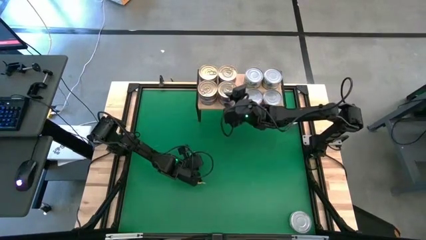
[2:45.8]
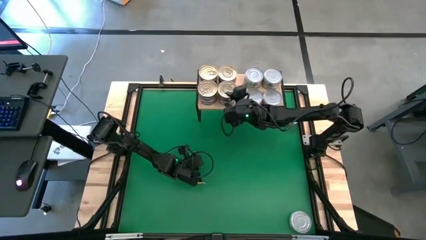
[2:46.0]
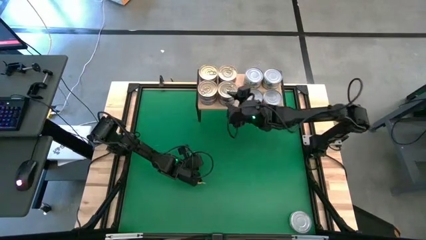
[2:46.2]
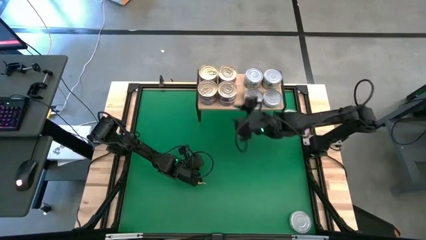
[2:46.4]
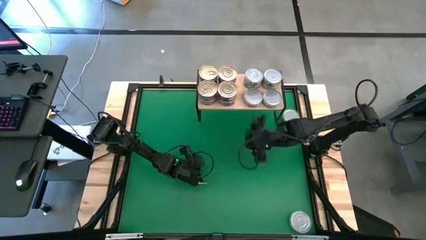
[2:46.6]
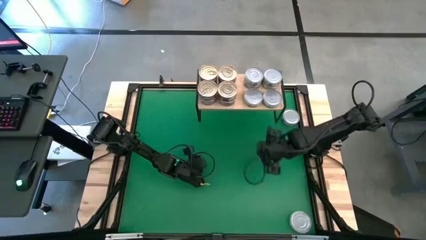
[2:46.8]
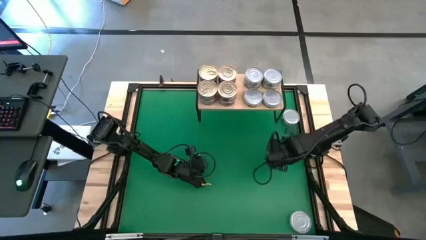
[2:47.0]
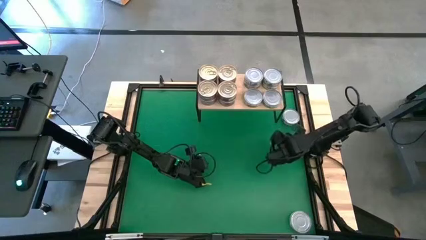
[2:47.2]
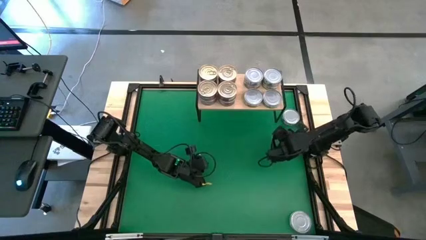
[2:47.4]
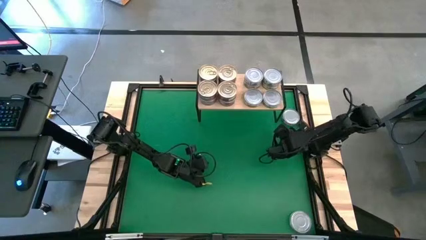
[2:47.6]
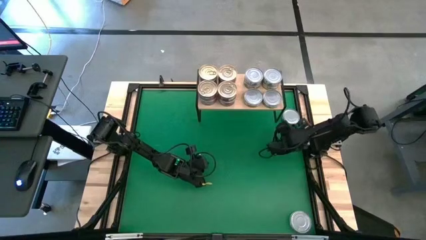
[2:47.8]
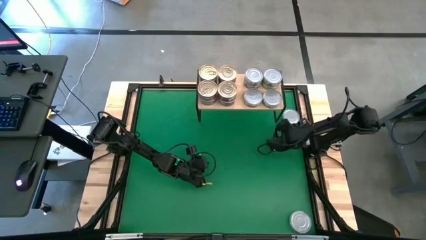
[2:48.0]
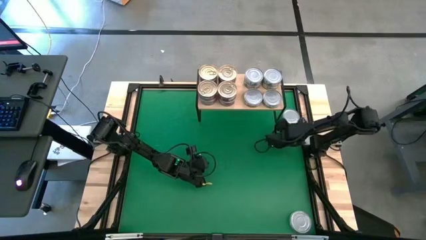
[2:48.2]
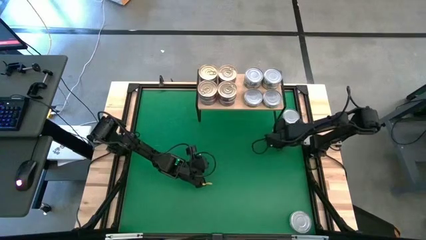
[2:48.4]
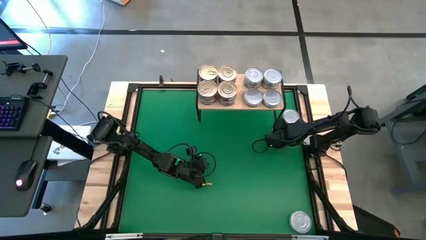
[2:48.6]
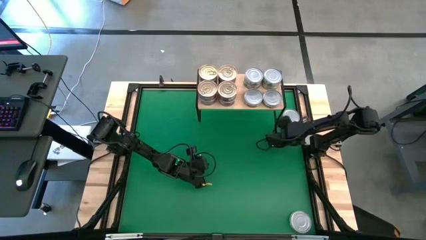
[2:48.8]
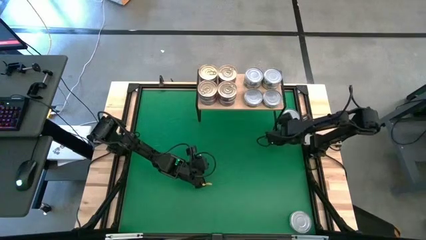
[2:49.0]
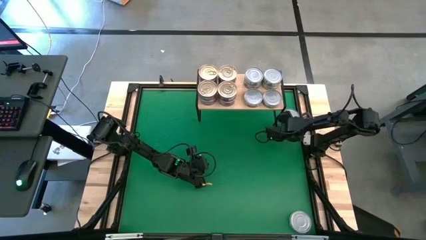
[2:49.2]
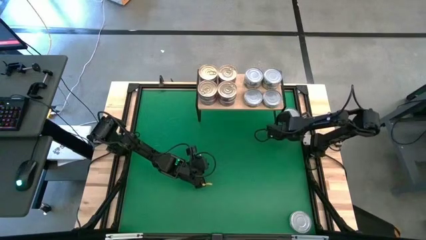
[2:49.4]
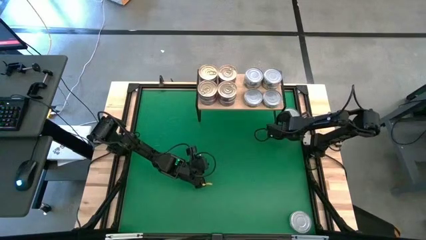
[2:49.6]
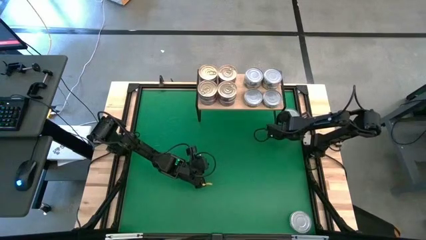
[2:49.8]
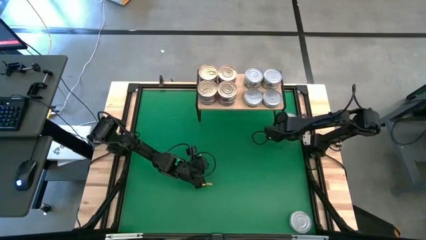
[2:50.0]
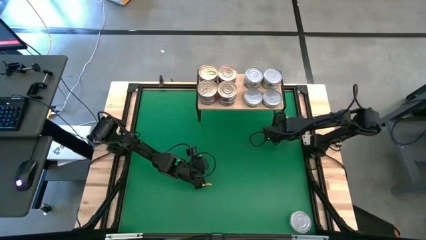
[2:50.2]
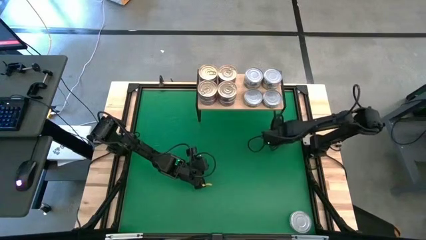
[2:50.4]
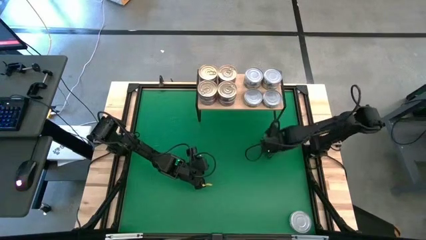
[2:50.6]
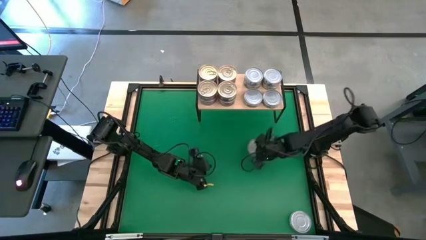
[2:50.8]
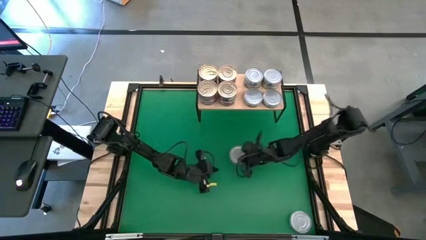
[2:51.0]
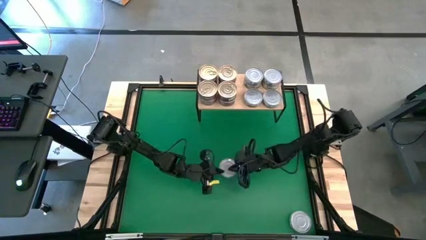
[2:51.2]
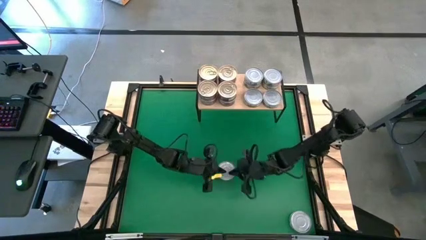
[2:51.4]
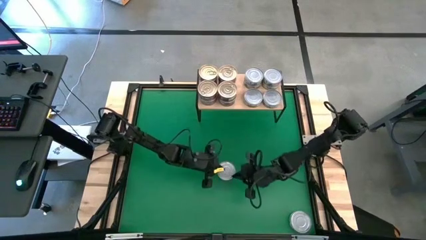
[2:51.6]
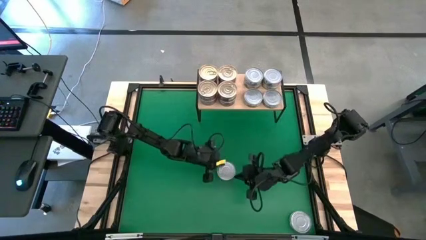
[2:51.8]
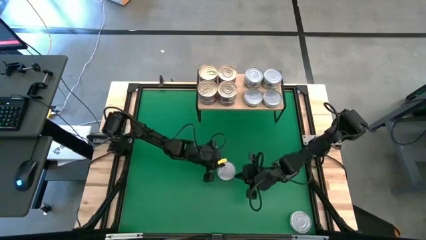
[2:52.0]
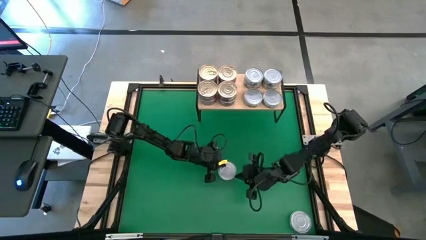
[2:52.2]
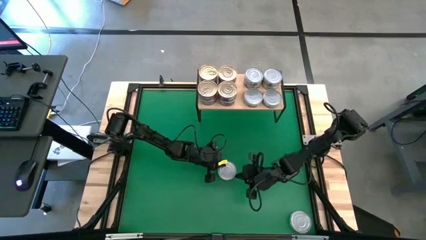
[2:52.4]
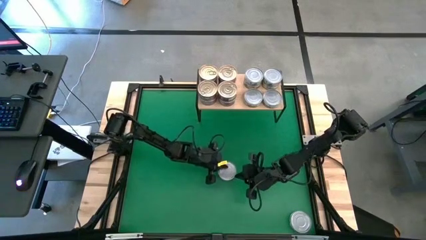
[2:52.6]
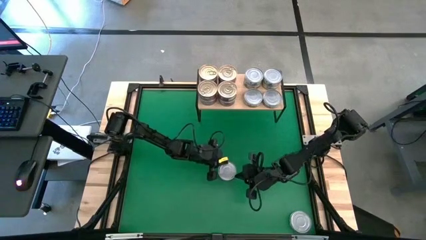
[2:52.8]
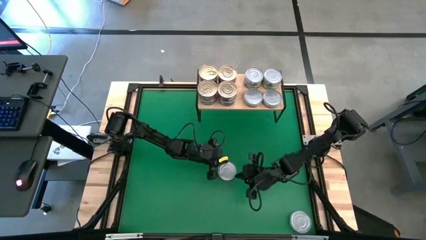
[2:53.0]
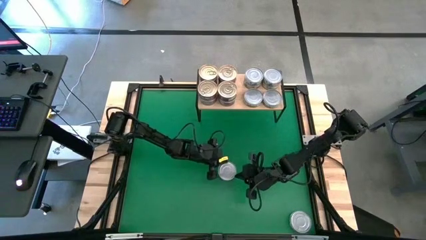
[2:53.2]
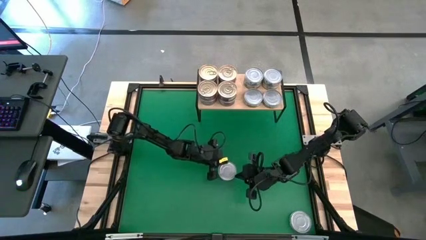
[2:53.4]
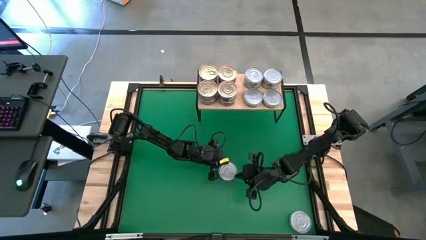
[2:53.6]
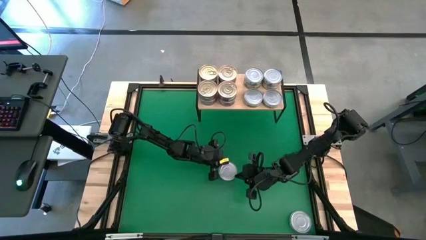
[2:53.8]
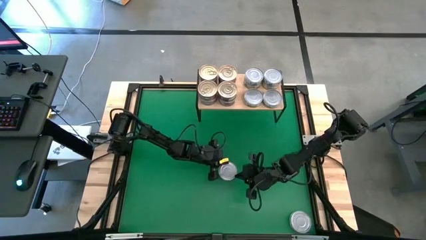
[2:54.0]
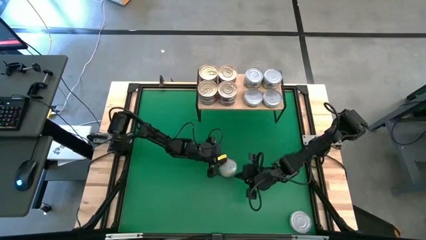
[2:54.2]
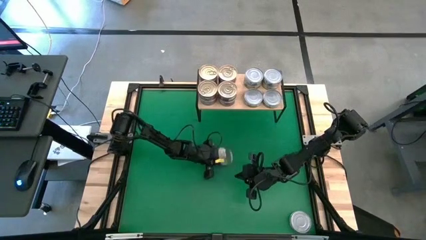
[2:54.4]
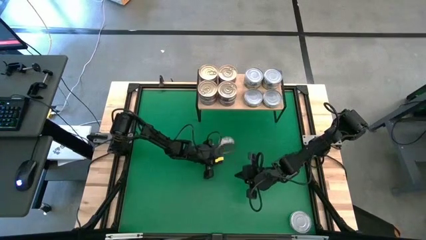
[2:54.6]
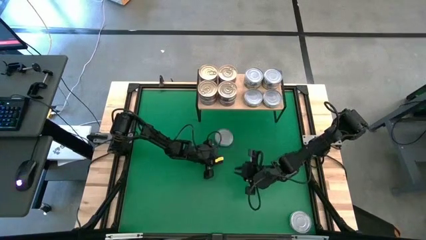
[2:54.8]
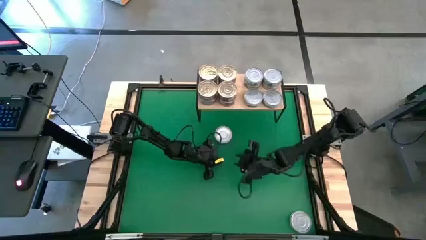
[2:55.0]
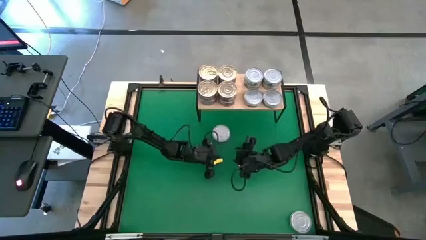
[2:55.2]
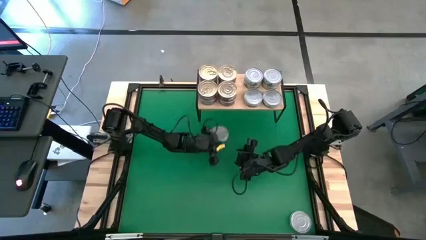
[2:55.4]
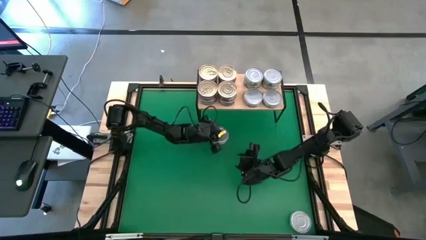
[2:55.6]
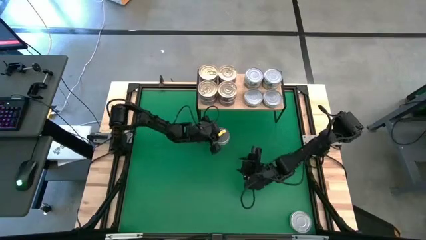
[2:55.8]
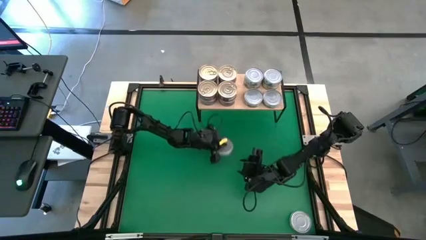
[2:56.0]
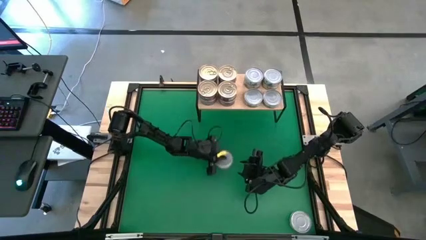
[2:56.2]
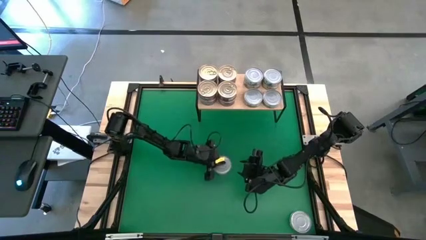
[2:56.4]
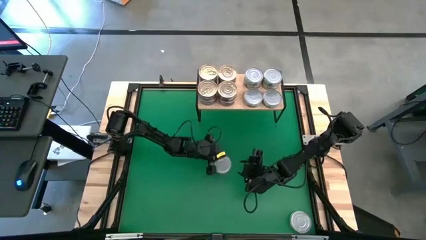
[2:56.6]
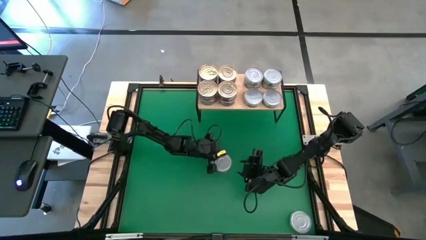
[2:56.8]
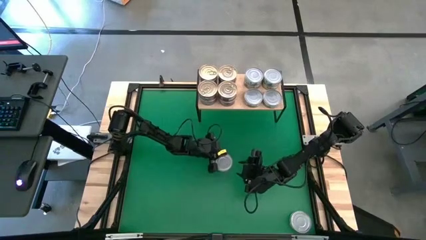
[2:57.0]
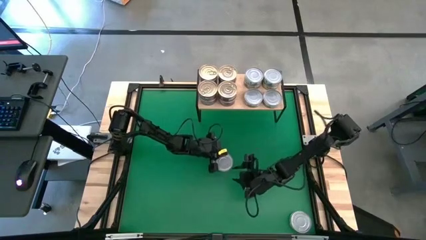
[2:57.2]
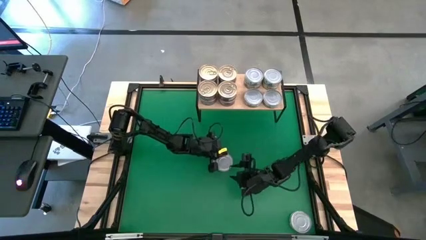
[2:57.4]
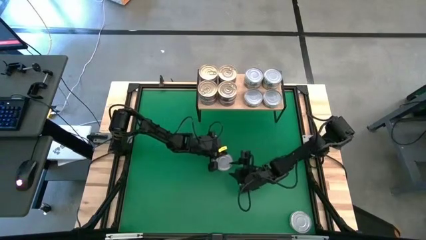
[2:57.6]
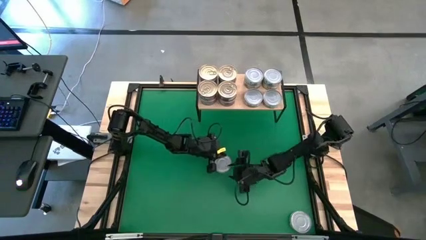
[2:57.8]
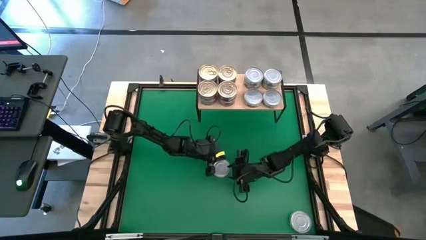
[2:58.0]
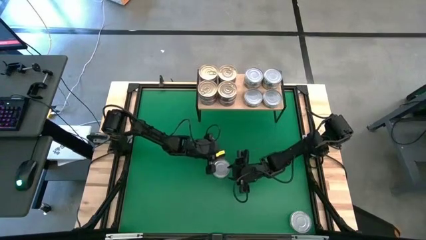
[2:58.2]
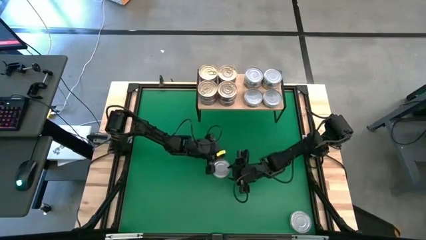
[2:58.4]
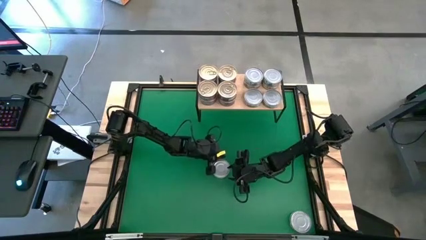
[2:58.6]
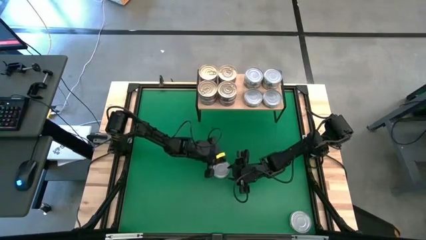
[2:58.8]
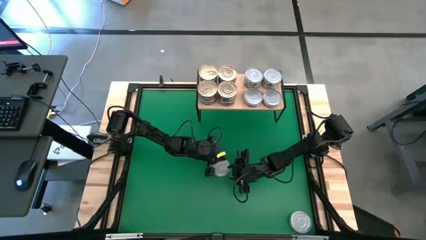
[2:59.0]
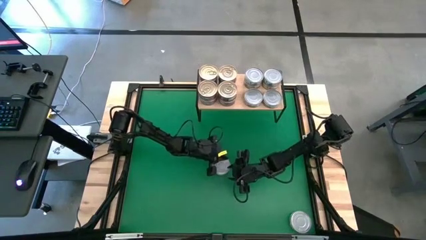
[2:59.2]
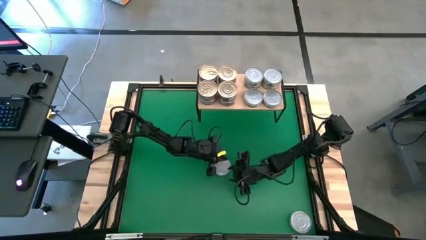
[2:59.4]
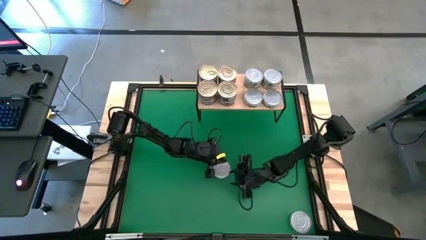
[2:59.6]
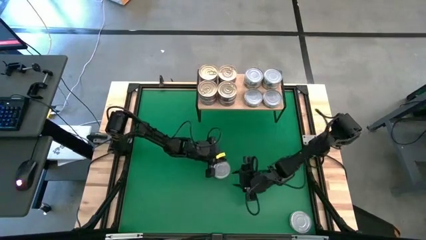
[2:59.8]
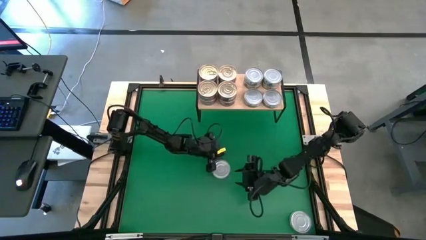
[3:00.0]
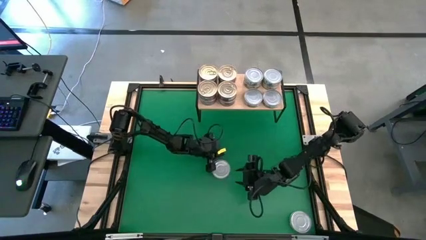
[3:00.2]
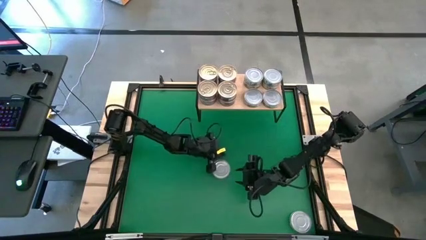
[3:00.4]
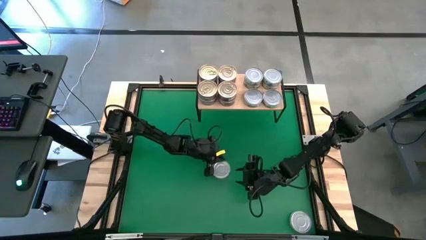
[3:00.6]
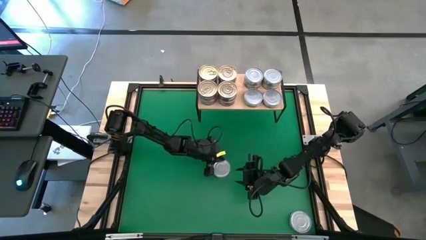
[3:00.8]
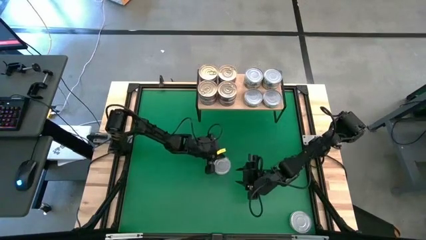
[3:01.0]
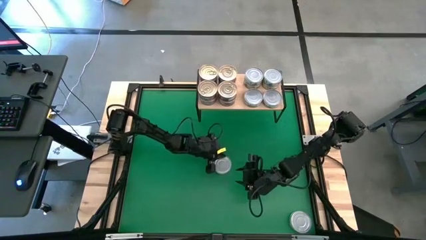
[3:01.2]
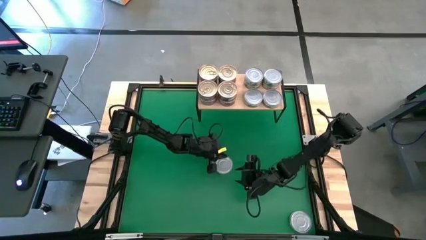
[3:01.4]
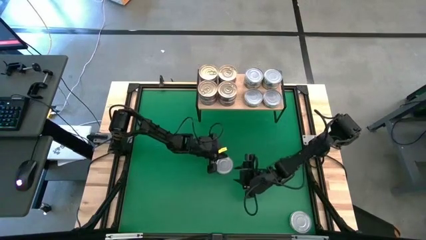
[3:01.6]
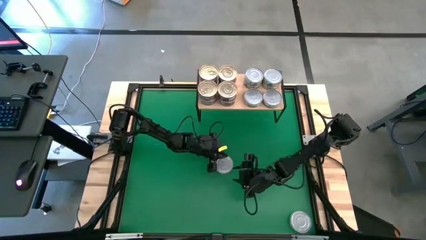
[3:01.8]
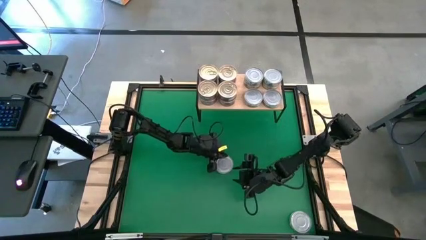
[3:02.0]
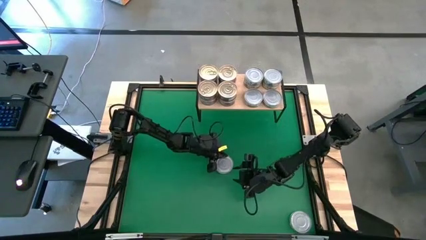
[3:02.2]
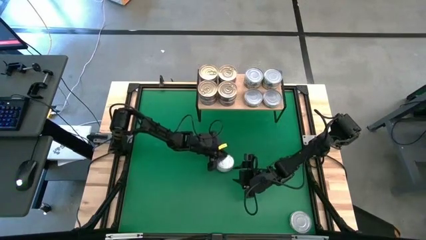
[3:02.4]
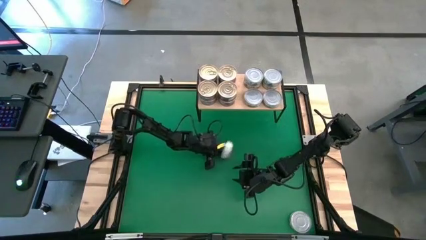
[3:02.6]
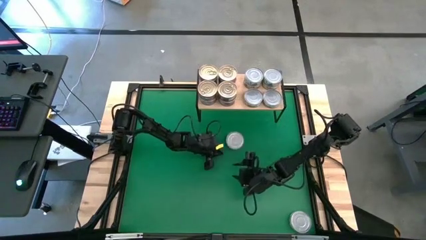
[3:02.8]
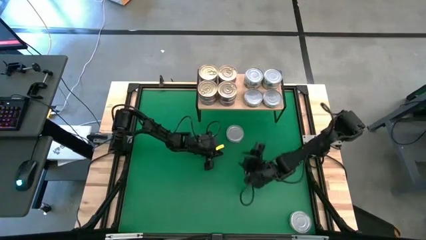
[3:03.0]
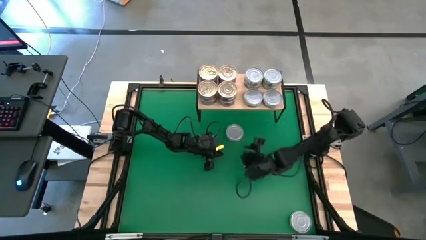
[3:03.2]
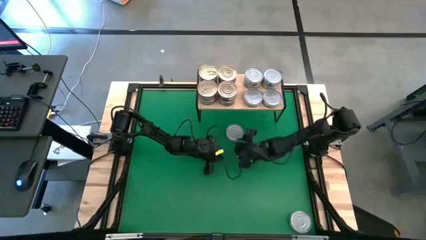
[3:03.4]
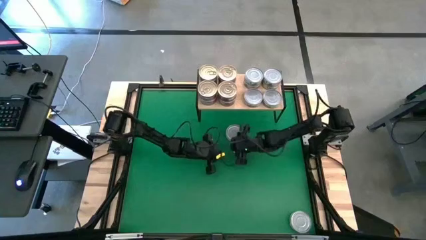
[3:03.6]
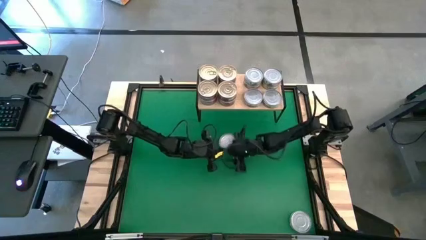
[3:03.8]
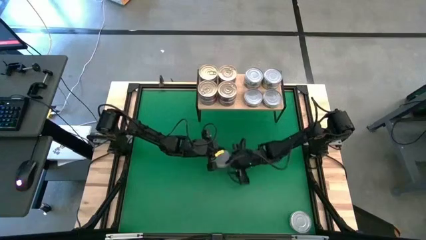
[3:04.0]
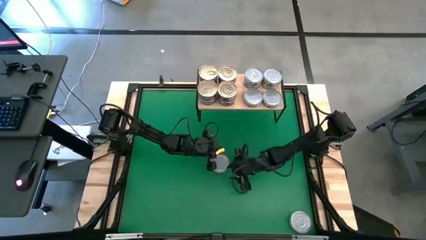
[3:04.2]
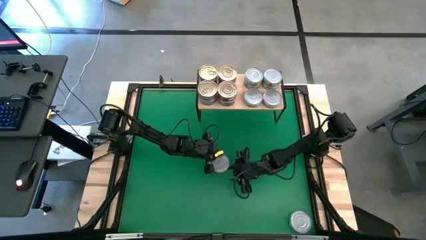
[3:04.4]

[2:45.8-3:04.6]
Task: Stack canned seafood by type on shelf
Stack the green tuna can on top of the green tuna can on the shelf
